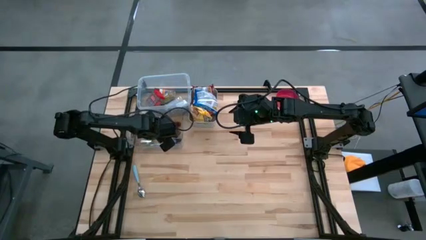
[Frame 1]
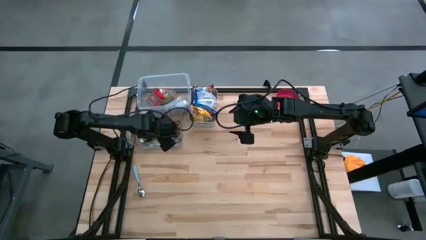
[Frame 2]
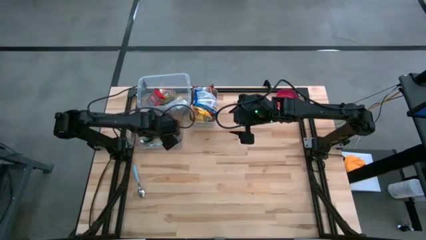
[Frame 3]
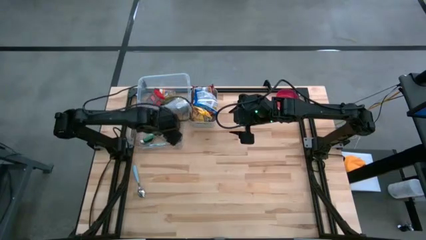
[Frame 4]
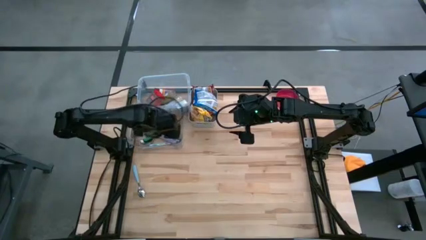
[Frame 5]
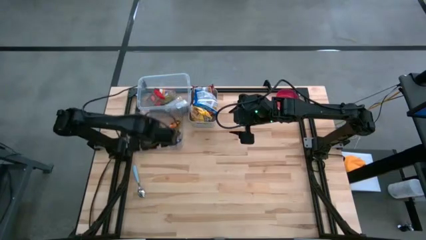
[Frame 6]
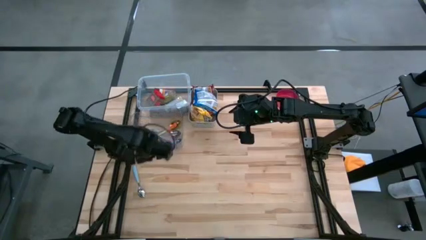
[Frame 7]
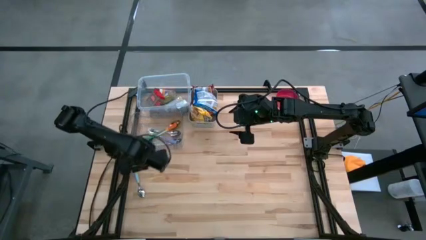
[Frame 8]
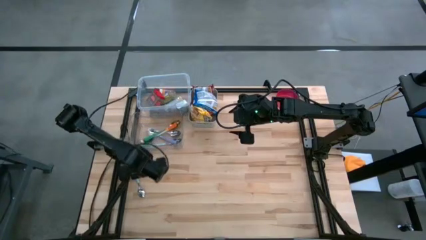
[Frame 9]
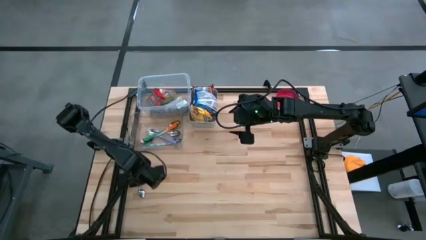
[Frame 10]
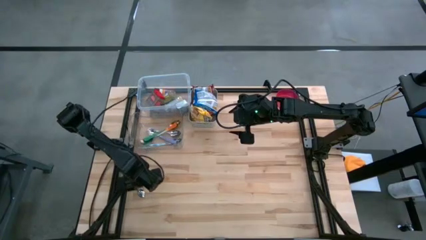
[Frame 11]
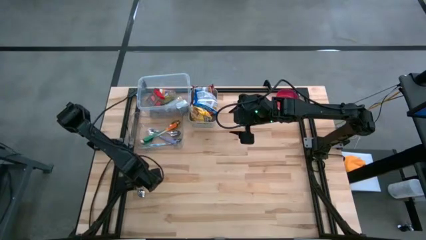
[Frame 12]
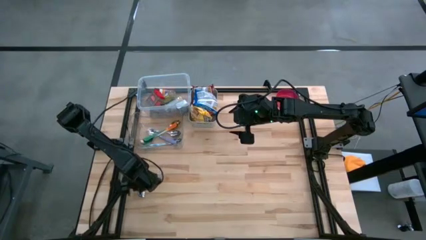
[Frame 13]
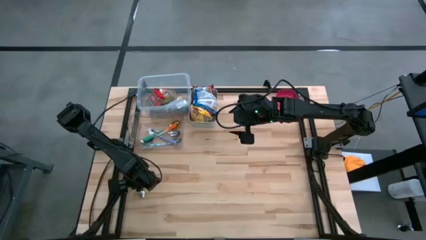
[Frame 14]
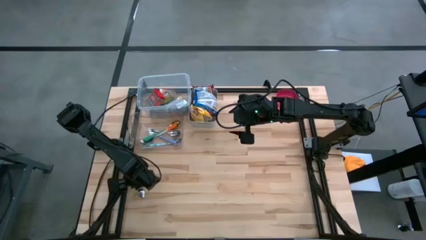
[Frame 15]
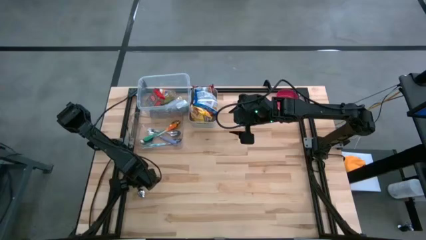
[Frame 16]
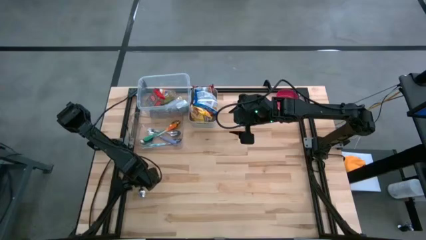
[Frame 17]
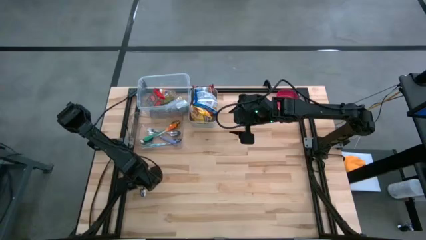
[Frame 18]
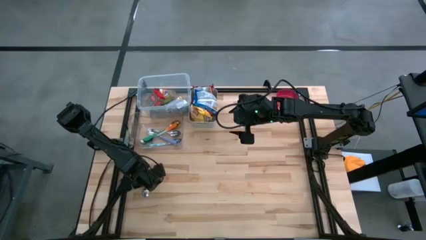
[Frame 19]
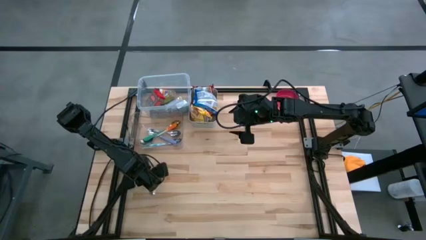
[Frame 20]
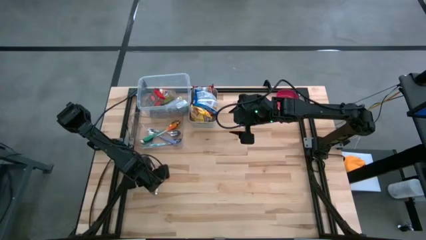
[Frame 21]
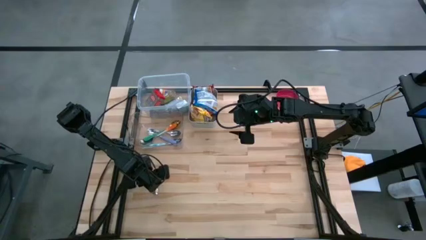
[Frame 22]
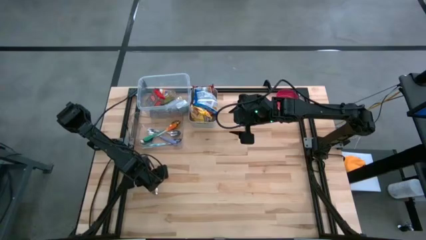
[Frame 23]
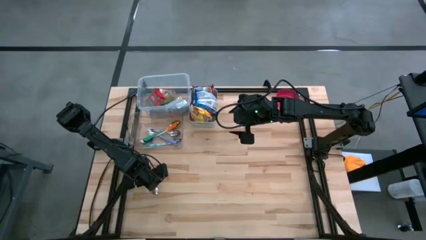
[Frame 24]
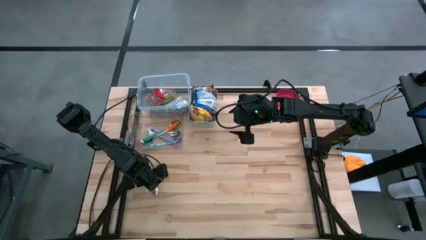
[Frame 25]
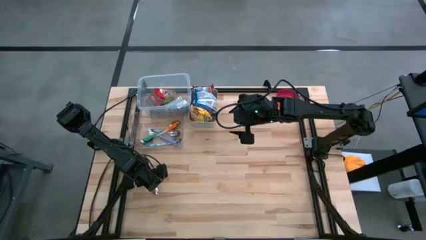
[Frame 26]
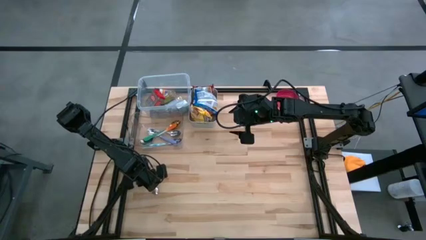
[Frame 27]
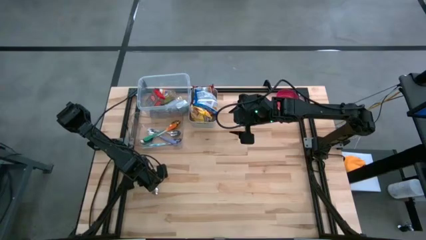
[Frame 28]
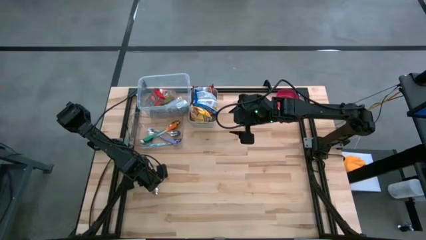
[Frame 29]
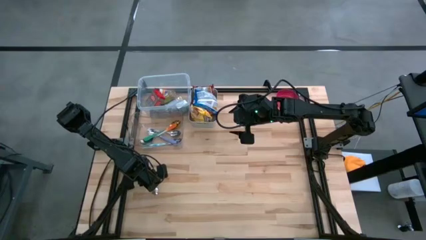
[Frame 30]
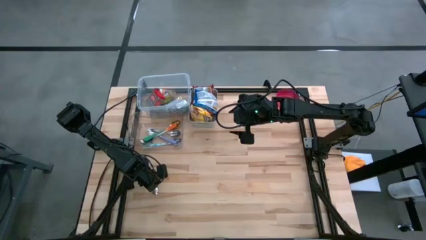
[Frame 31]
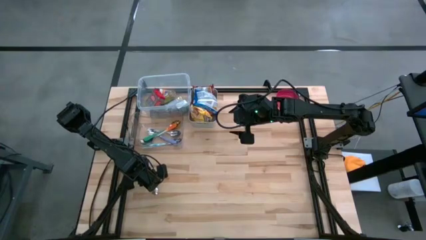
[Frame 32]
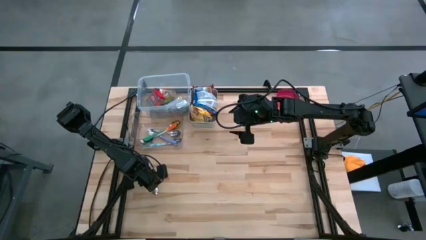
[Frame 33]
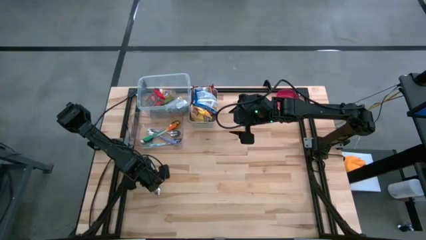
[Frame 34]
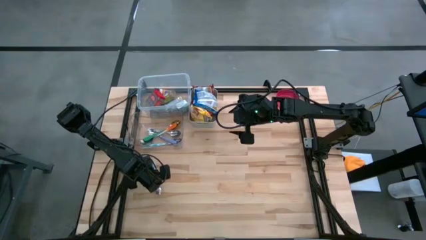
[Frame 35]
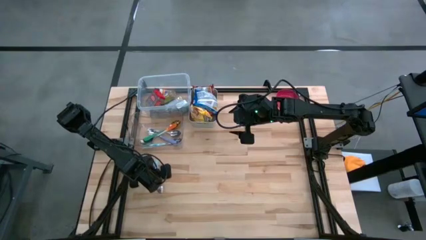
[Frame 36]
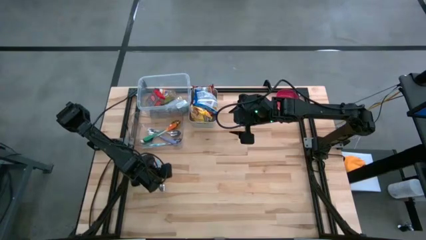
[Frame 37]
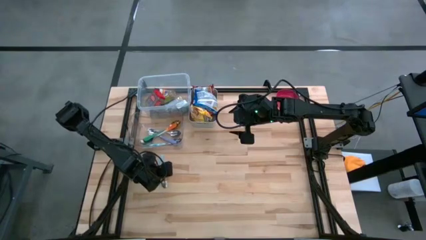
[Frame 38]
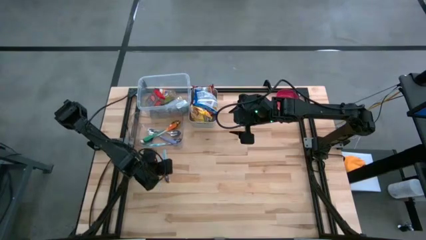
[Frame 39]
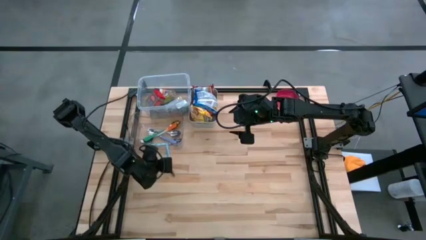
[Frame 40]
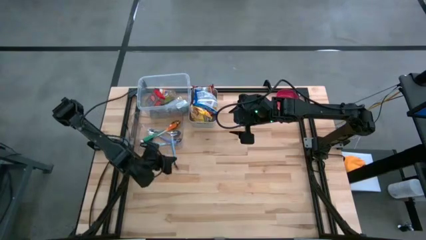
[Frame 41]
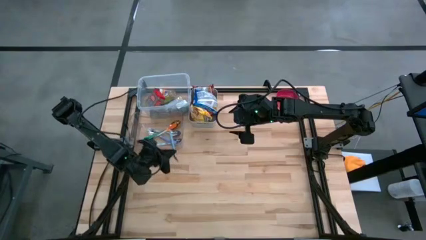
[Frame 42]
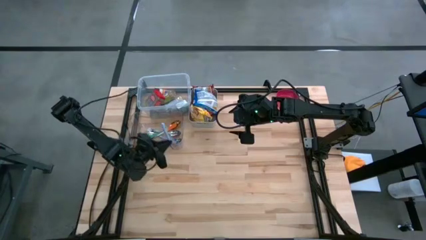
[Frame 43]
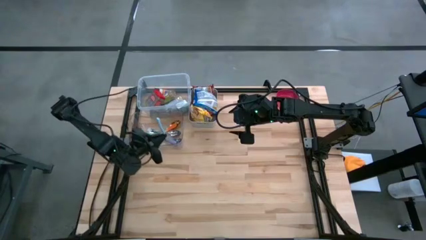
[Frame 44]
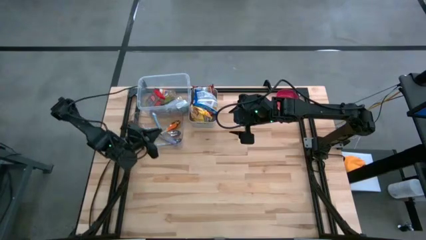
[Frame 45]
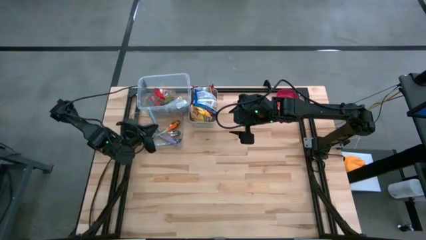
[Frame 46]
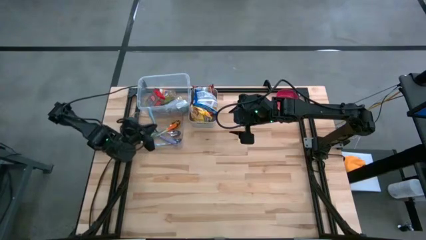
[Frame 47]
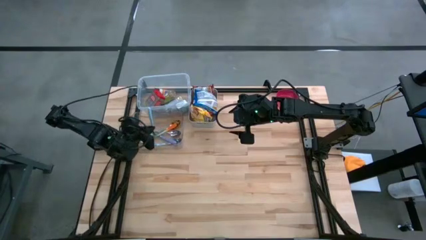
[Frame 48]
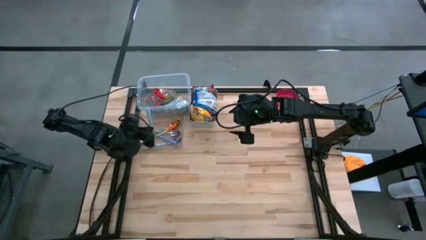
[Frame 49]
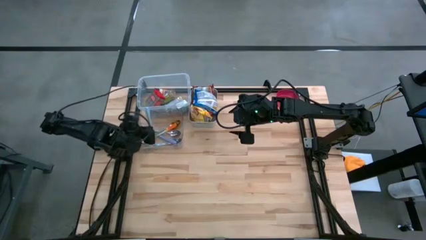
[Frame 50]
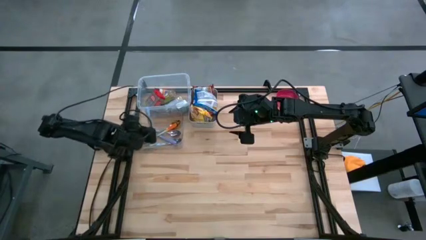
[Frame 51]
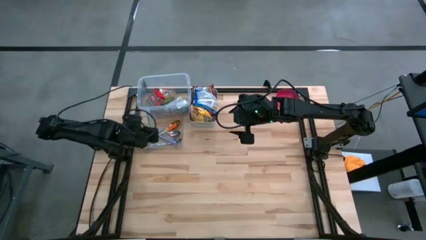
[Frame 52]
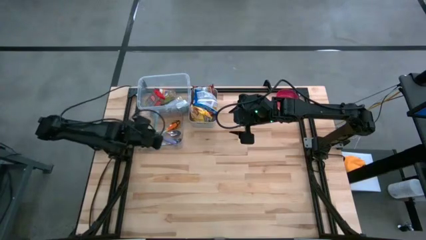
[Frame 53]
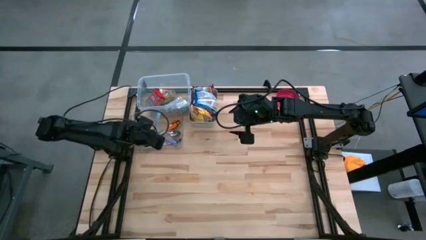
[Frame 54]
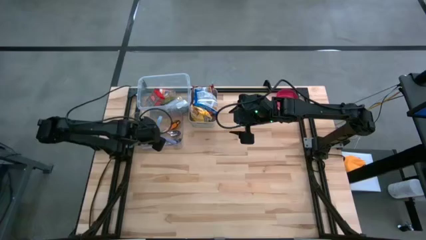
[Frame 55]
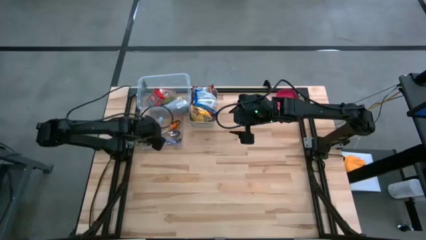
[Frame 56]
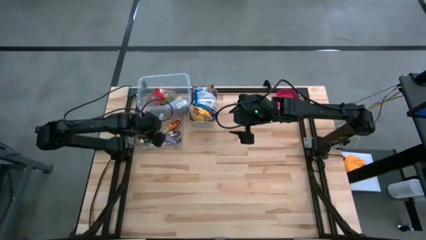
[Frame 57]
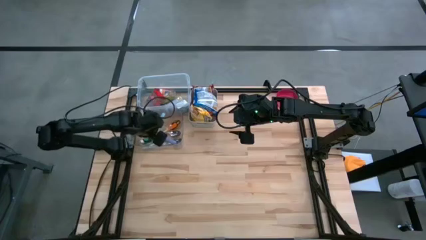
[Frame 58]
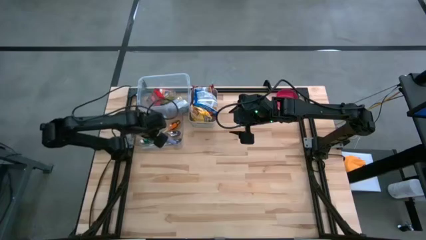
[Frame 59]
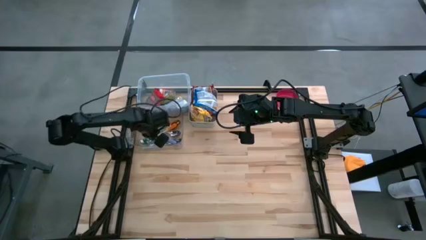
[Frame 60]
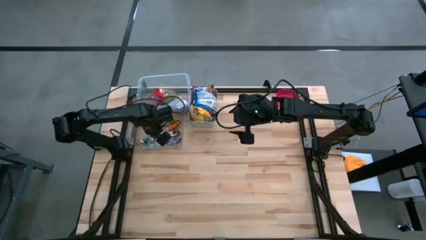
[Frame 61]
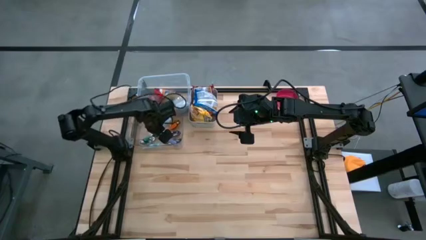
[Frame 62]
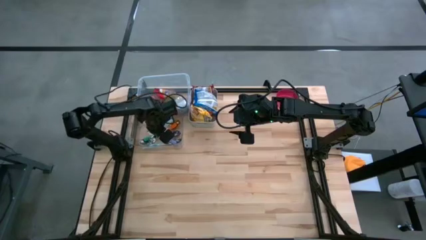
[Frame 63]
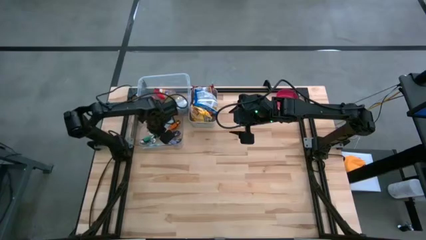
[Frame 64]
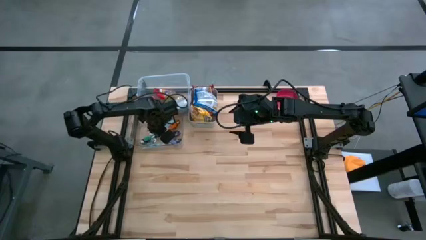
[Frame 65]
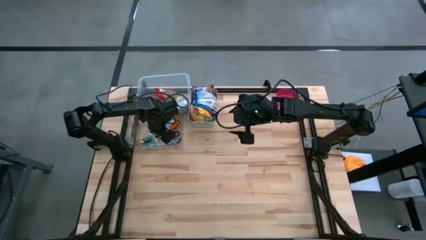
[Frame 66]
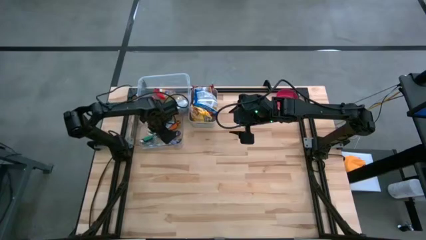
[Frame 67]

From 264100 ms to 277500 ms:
Put the blue spoon into the transparent bin
